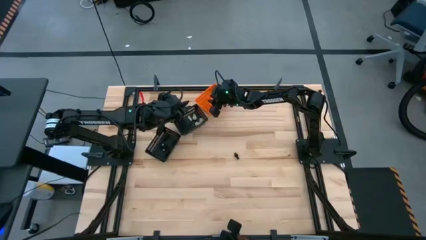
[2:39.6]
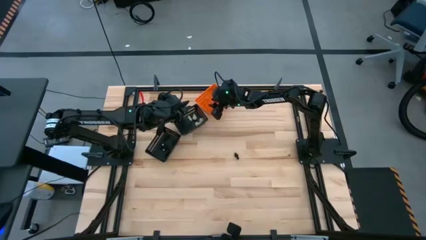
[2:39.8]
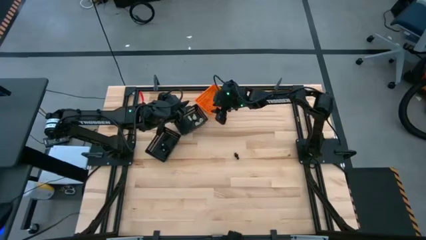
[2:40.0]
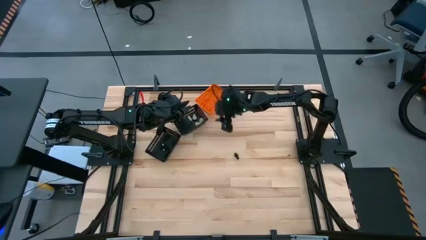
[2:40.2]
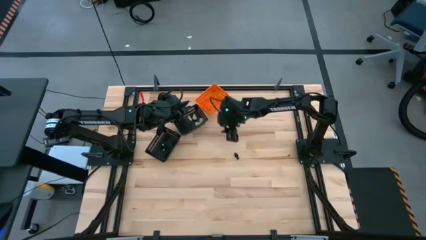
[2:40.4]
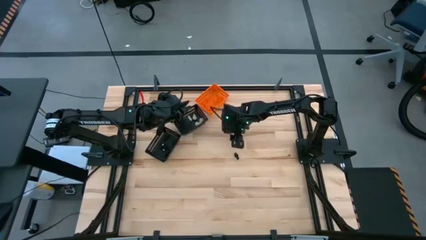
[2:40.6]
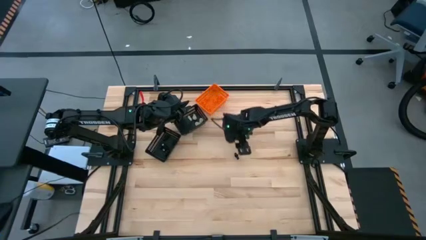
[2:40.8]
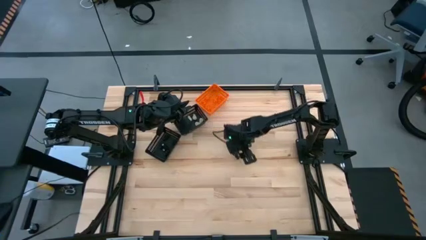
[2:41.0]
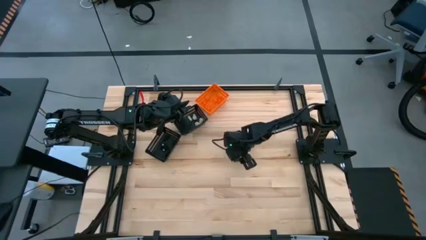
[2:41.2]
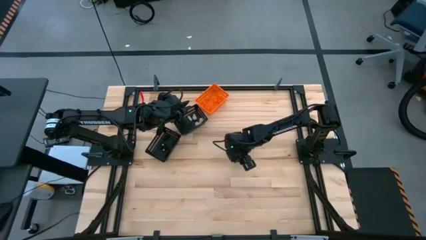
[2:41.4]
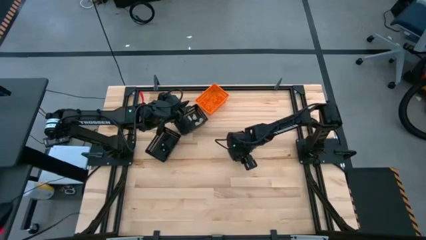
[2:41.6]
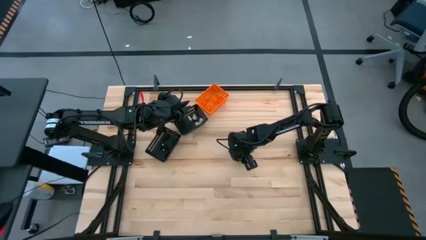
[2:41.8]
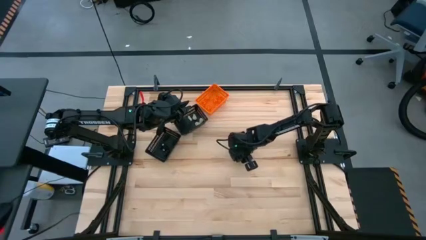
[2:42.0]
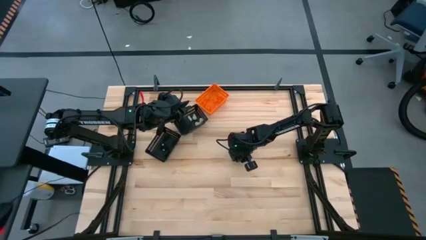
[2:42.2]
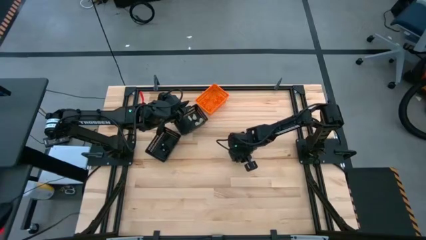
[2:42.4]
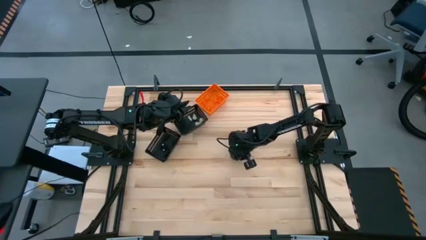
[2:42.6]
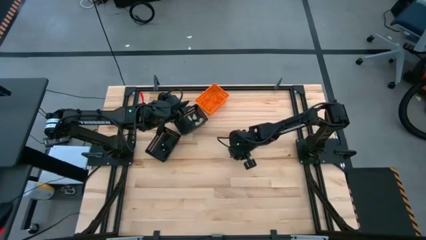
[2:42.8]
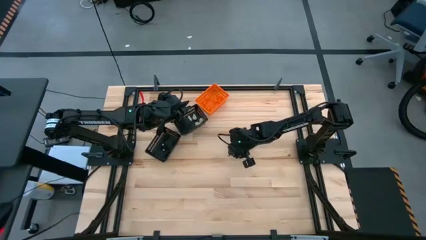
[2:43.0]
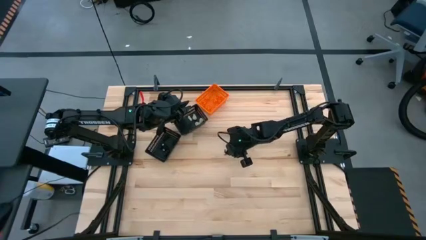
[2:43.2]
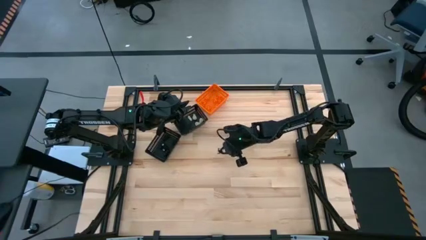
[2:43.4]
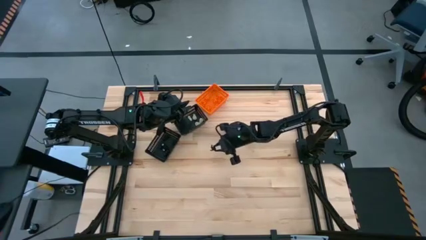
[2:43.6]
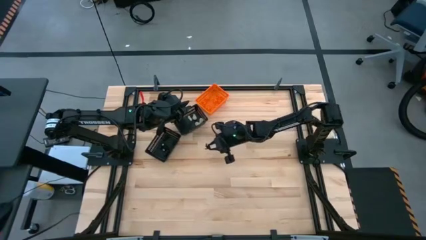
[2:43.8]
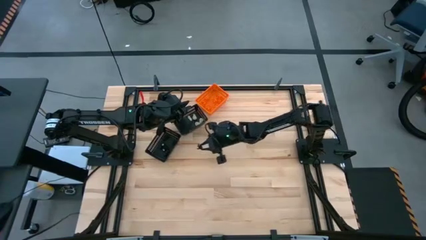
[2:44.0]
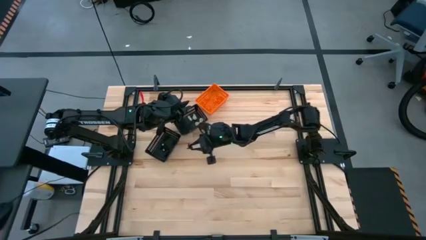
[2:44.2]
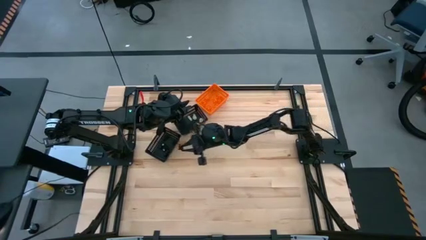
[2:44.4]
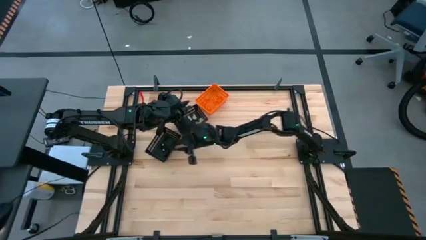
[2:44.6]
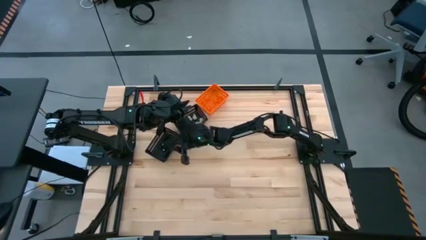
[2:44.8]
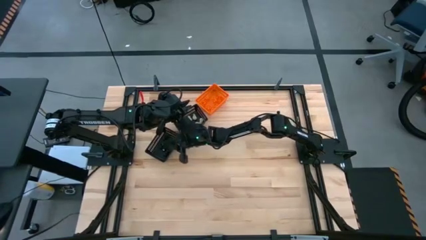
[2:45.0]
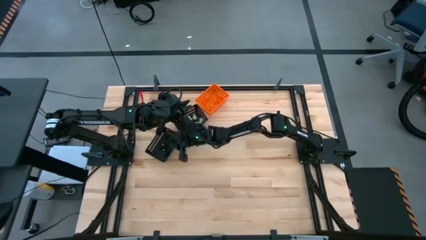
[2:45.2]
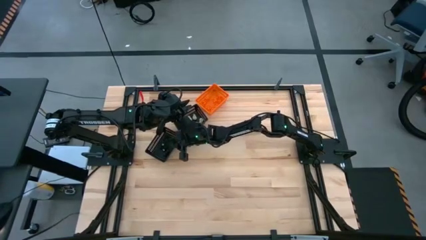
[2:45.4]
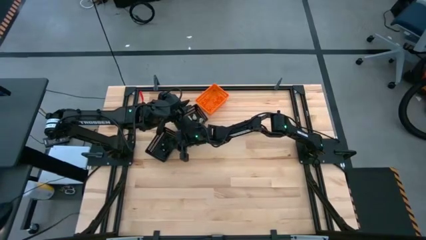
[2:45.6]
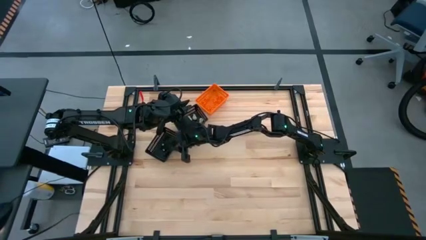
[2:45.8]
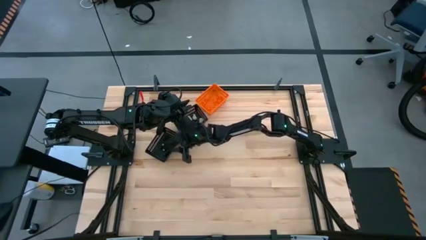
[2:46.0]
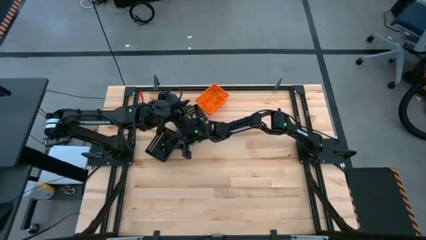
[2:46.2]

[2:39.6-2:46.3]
Task: Sort Halloween decoration
Put the black voodoo toy into the bottom black bin

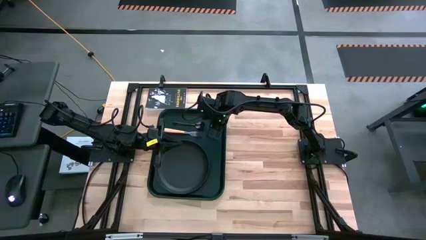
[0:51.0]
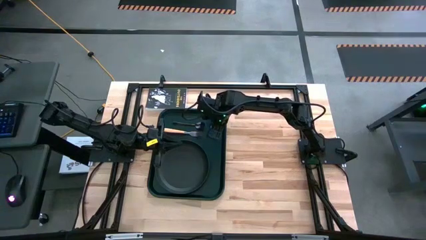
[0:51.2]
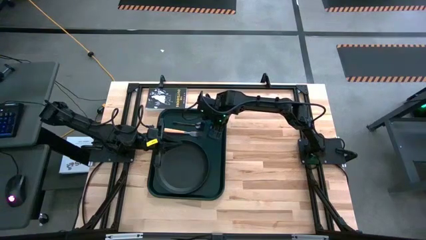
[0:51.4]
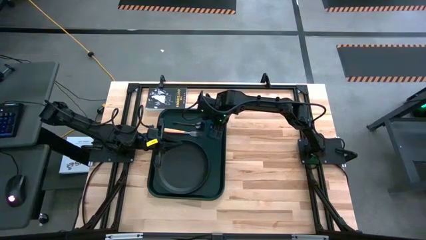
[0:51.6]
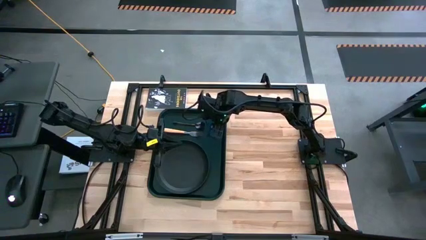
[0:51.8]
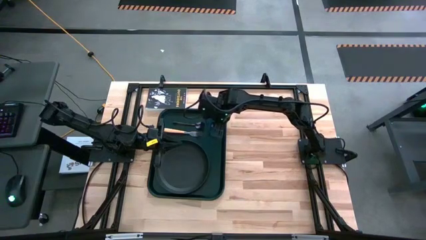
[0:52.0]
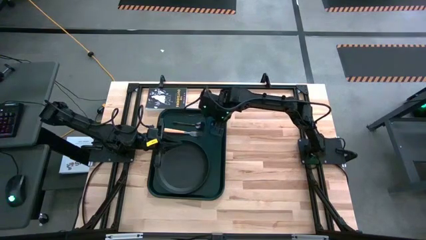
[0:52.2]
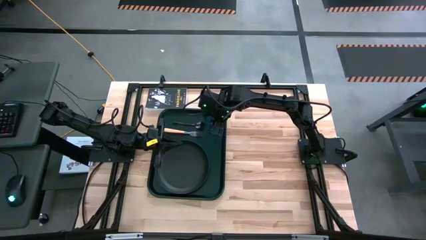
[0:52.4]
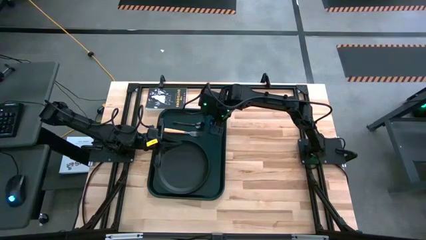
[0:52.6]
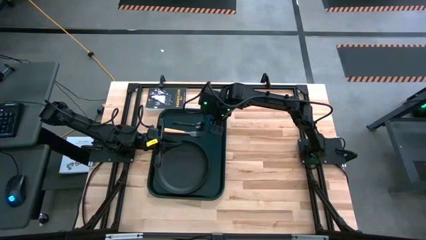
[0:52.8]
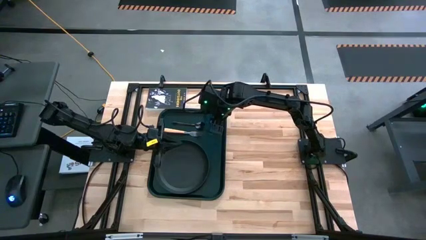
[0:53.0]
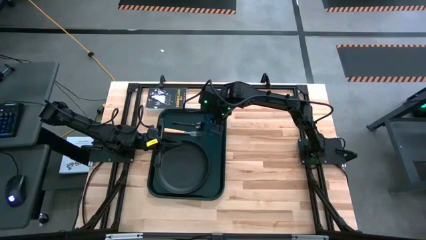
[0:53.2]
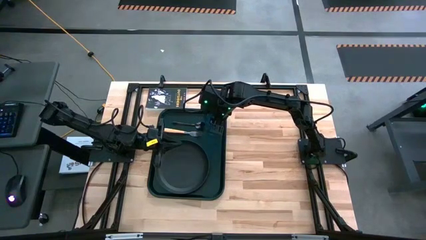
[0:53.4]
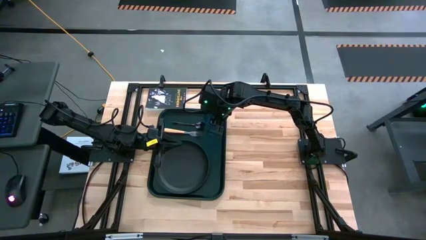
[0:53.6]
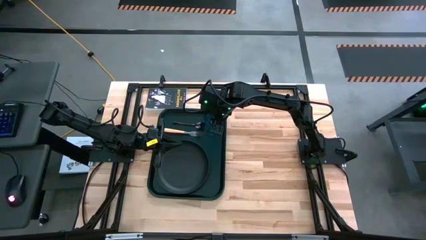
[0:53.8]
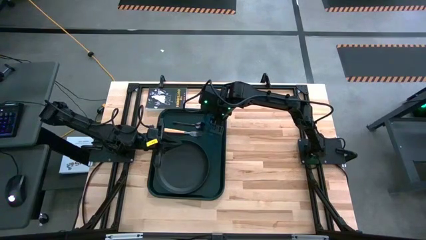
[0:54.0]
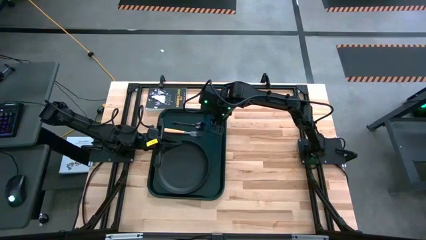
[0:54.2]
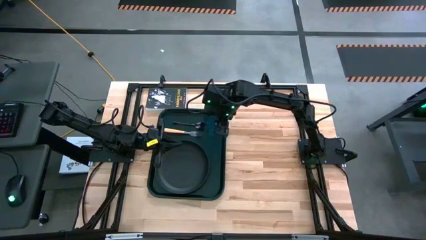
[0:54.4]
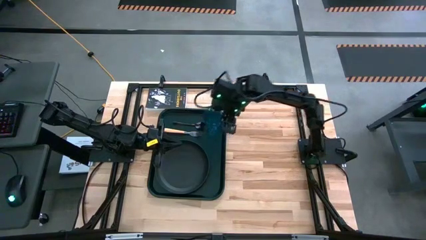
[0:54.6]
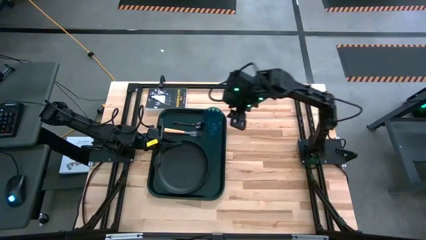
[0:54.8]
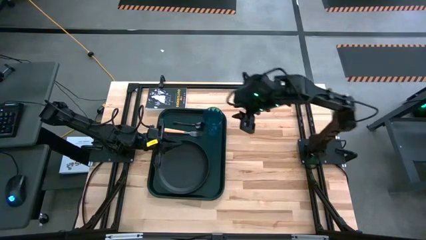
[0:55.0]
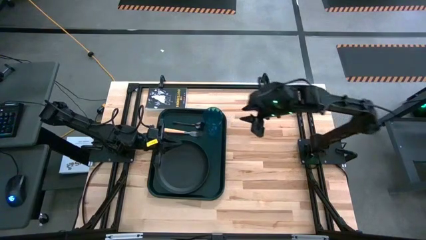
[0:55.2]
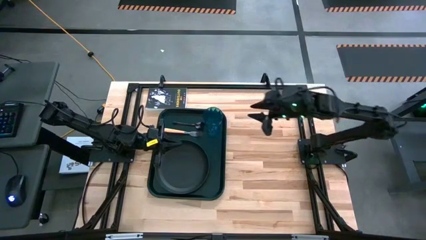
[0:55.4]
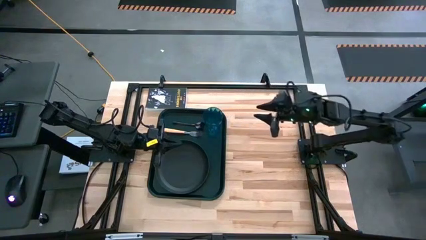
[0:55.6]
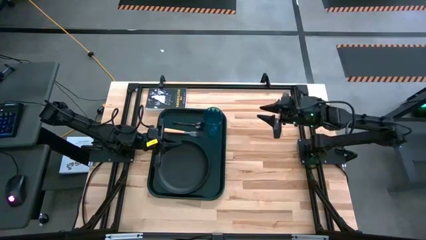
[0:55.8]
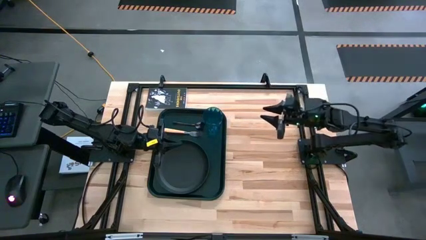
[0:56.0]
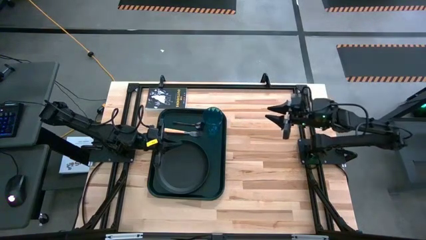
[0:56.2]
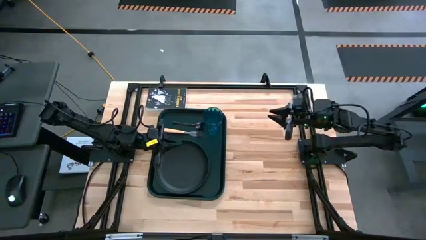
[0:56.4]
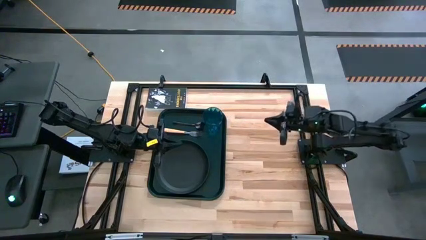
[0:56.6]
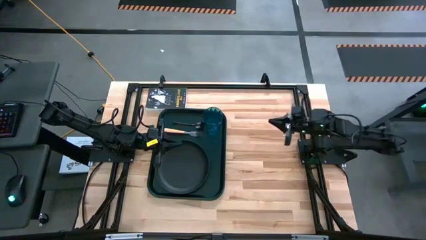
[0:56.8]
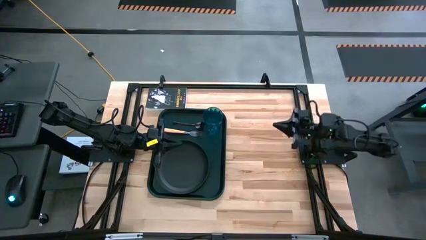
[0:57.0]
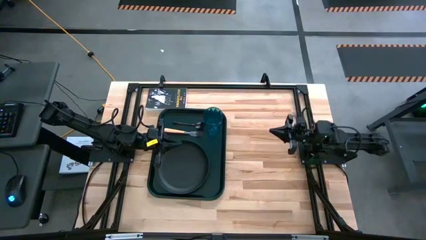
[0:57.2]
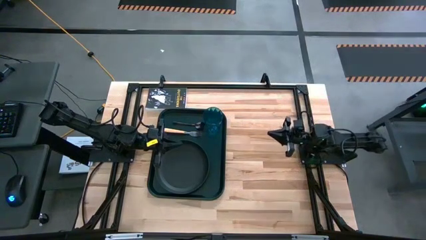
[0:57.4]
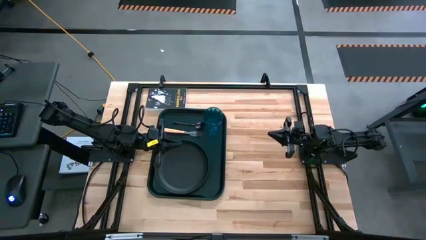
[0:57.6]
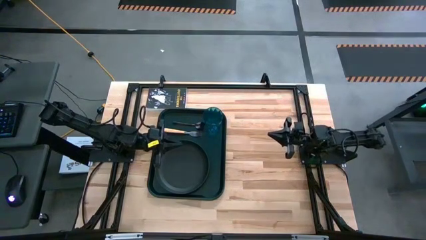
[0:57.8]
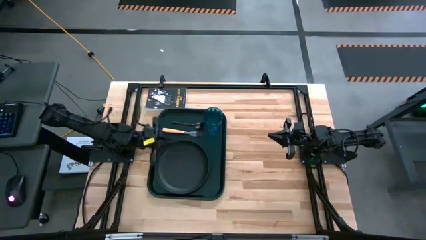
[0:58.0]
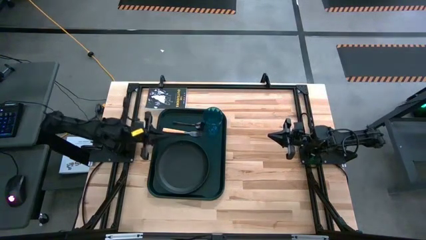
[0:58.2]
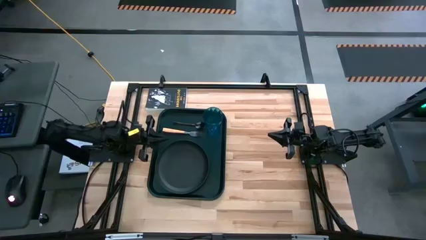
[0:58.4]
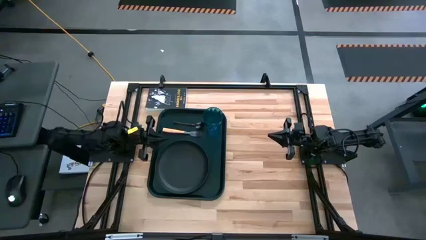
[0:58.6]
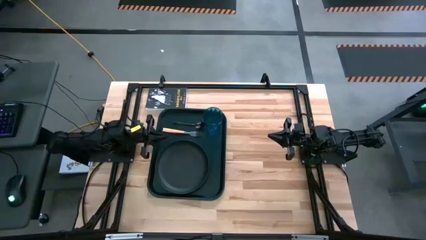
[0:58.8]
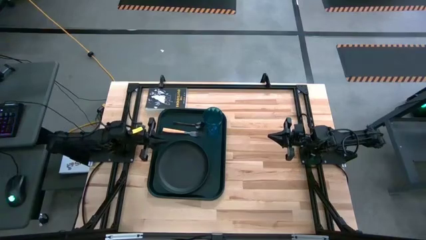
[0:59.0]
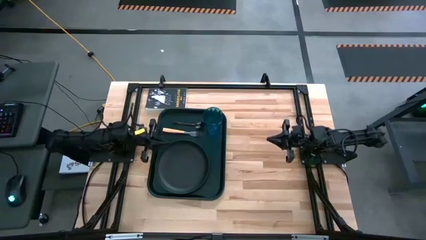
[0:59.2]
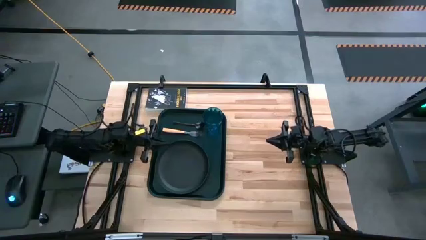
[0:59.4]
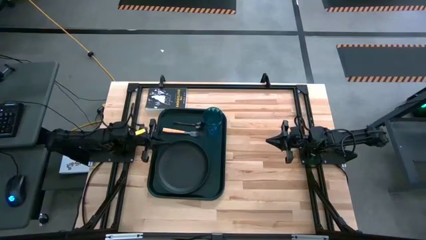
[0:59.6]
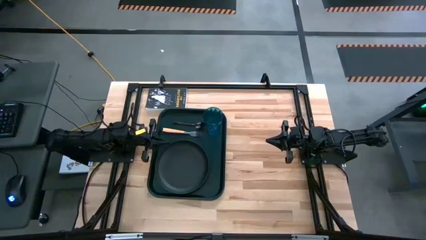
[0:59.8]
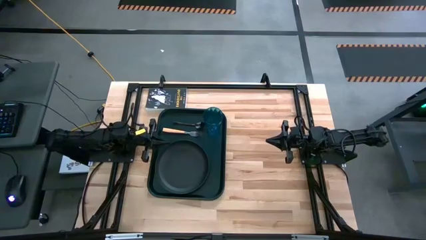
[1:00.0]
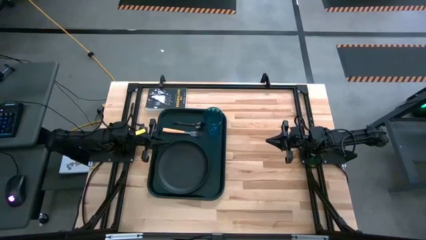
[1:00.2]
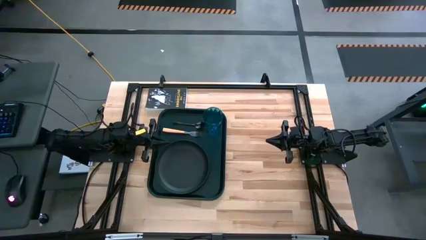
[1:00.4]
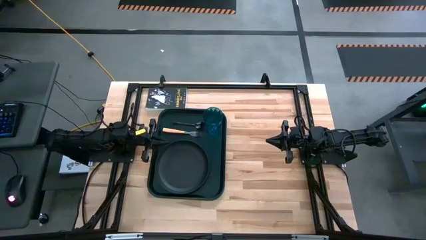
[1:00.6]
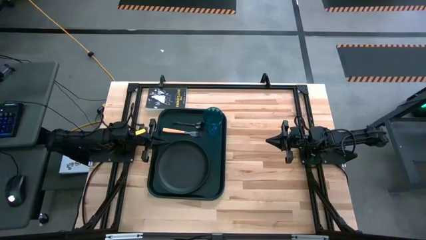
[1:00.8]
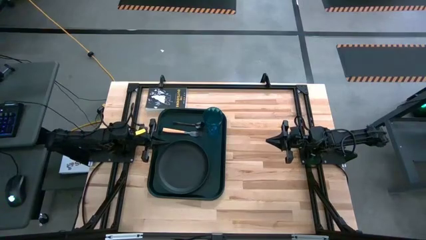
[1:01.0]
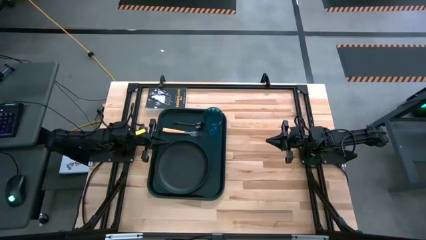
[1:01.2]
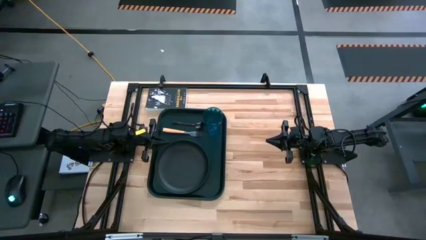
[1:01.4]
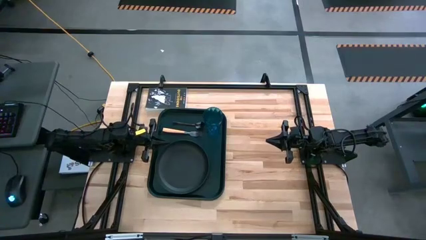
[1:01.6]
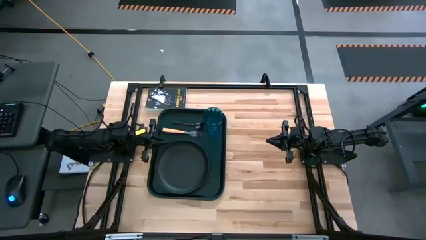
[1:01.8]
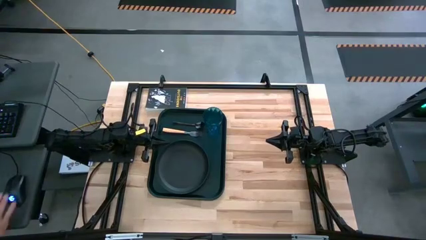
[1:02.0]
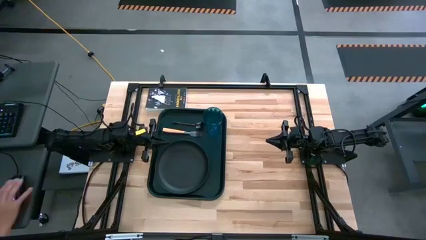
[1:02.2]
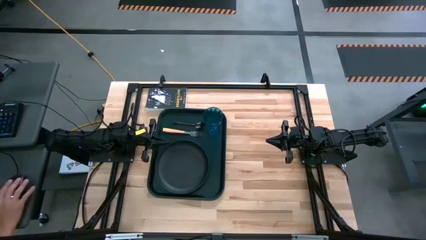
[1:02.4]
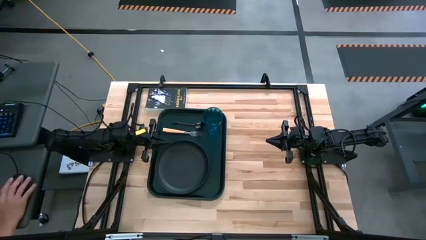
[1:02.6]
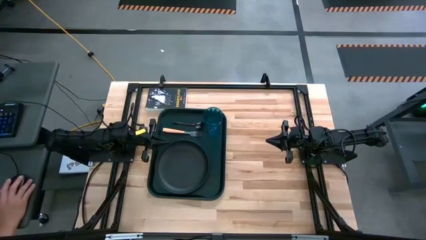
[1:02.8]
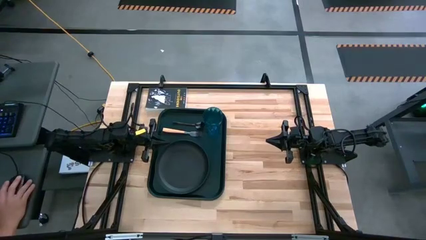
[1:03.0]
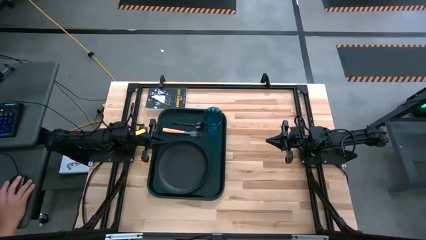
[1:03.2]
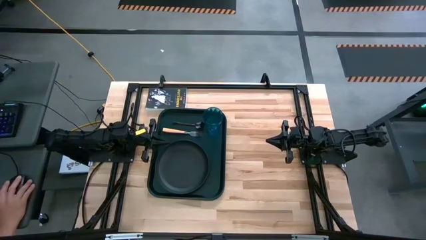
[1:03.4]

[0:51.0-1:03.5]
Task: Pick and place plate/cup/fork/spoon on tray
Return to Home Position
